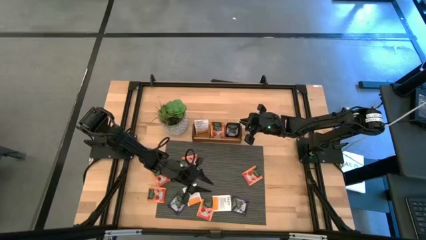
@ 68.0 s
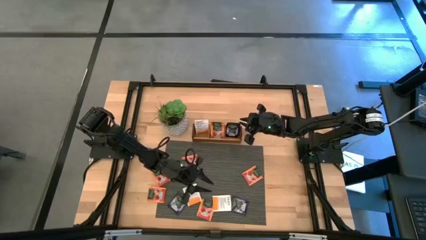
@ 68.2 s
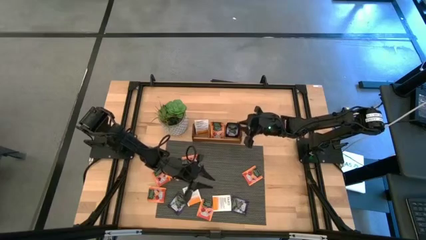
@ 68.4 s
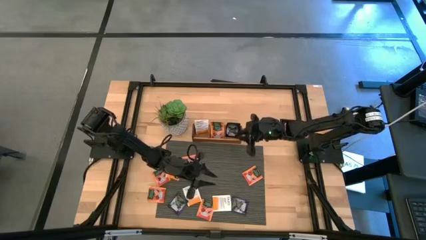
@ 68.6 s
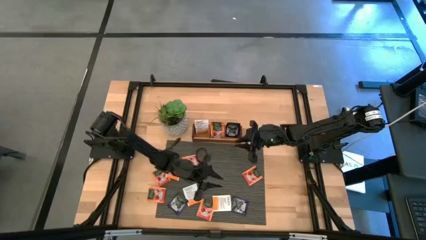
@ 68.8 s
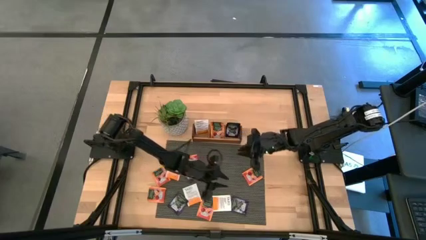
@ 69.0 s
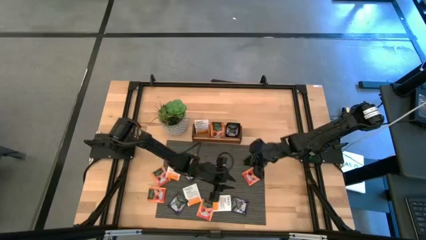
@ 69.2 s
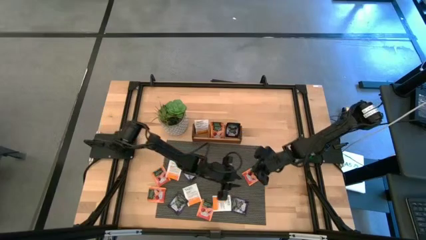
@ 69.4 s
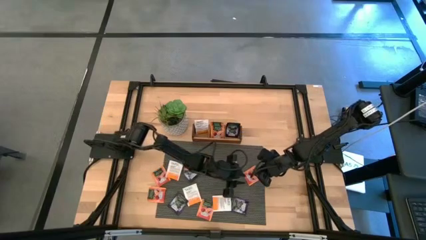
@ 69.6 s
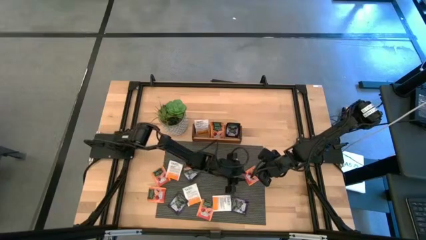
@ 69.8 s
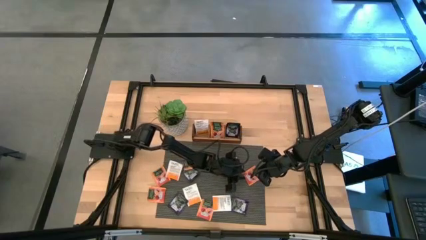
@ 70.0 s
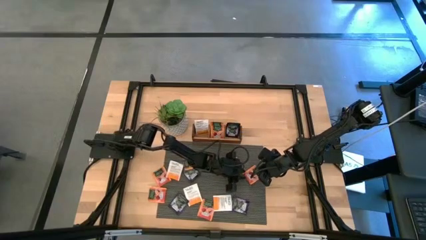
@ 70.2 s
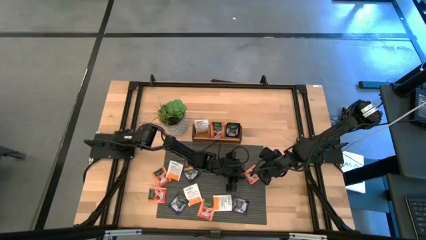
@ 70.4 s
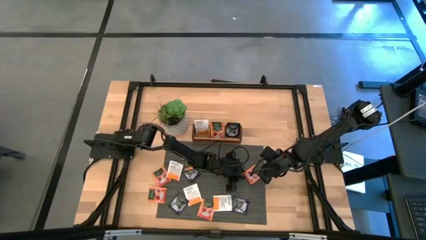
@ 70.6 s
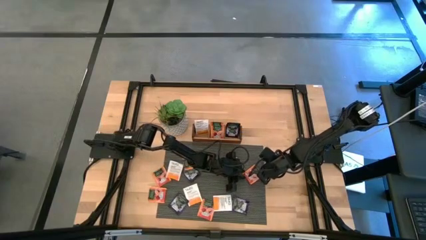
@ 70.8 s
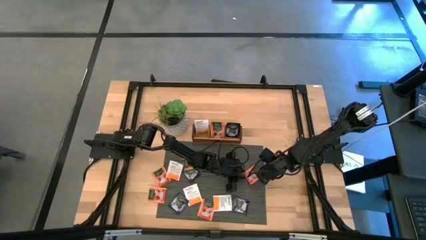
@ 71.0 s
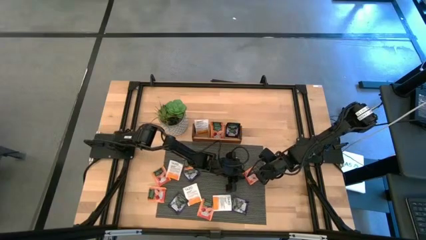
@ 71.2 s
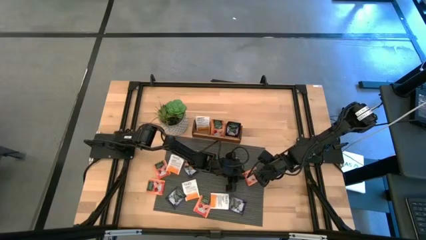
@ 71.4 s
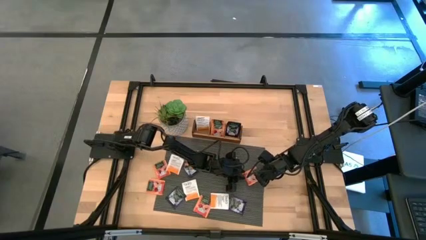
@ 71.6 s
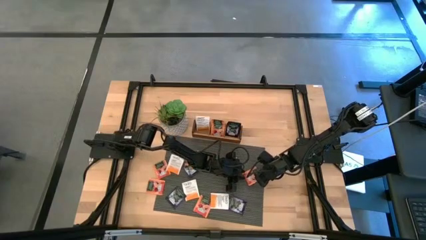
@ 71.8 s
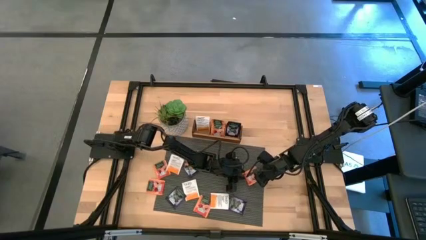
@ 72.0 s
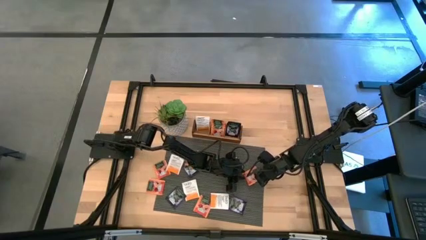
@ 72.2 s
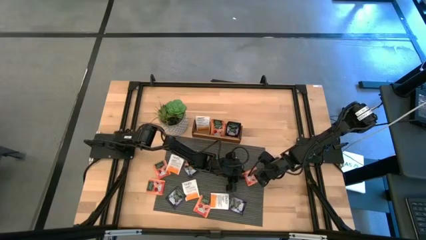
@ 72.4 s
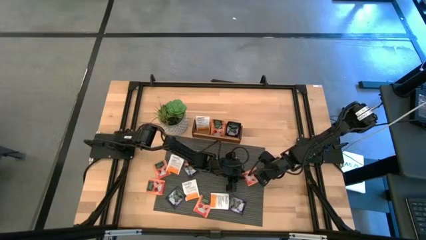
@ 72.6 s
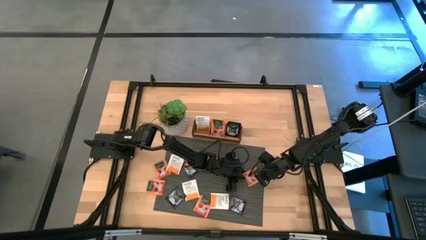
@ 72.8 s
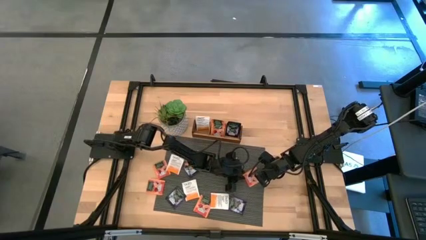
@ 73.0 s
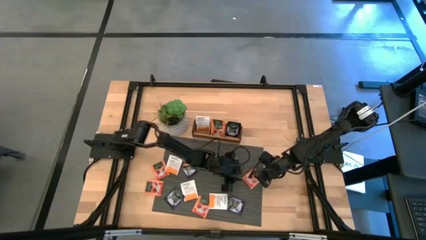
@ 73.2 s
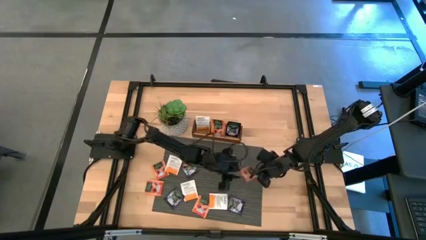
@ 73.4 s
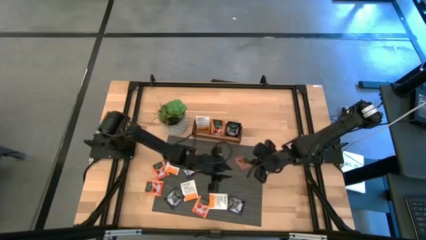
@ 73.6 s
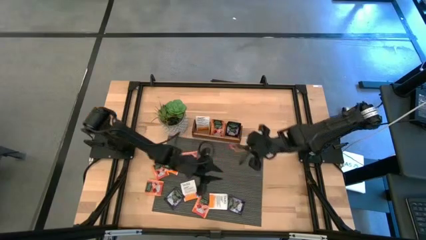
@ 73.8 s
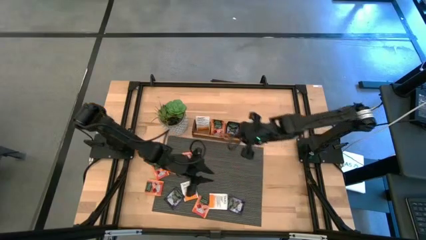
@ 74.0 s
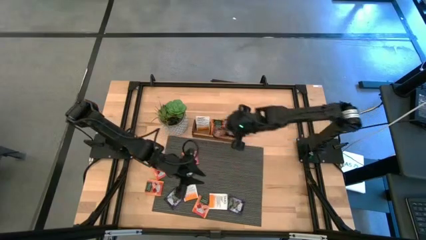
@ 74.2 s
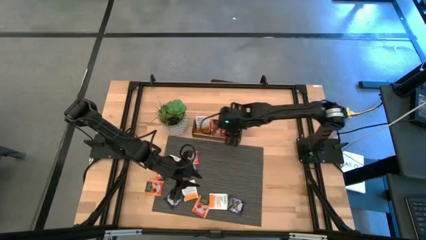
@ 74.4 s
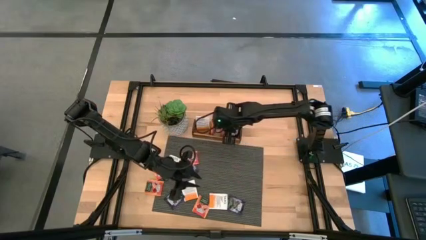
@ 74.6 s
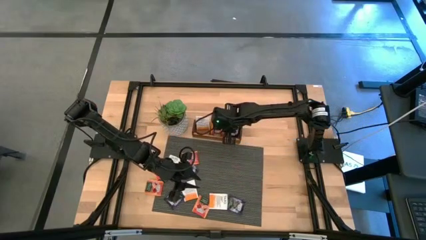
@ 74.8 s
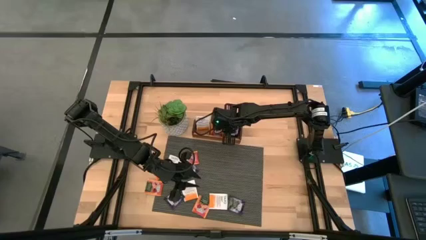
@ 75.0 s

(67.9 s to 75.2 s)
Task: Pick & Place Tea
Put the orange tea bag into the middle section of the wooden organizer

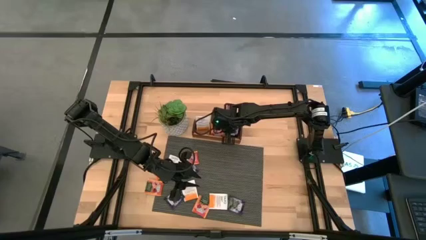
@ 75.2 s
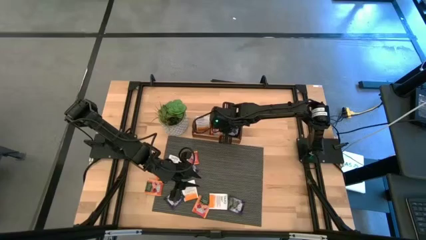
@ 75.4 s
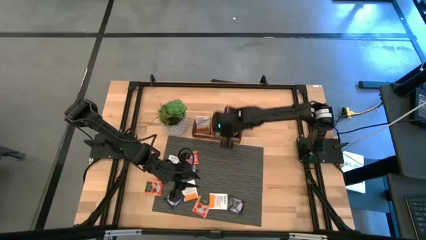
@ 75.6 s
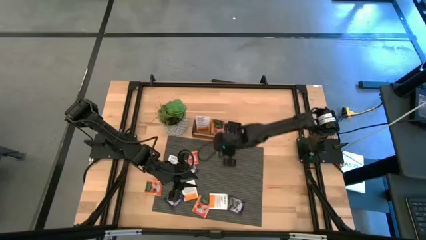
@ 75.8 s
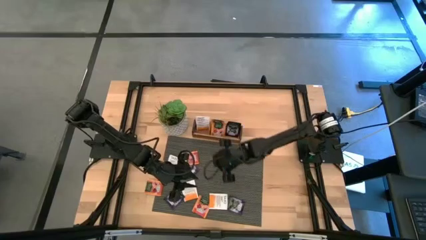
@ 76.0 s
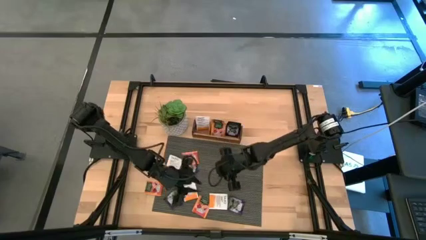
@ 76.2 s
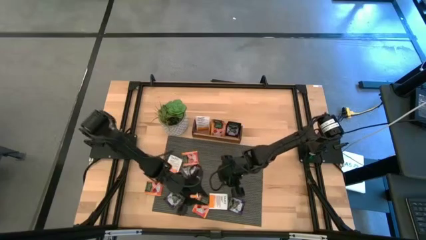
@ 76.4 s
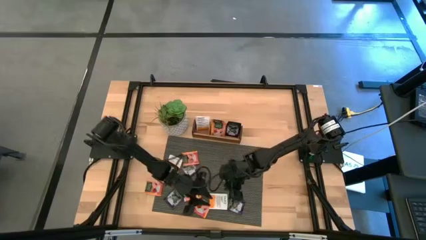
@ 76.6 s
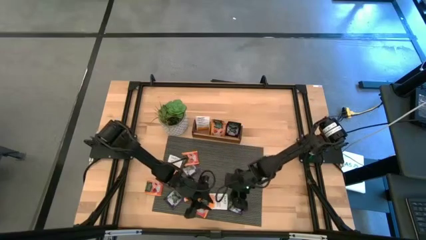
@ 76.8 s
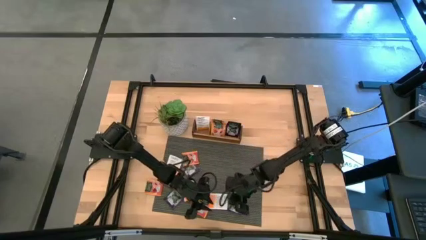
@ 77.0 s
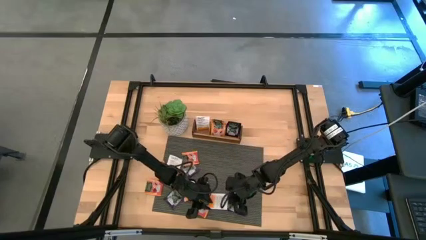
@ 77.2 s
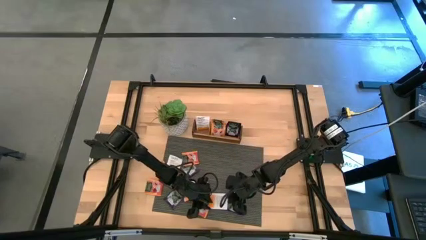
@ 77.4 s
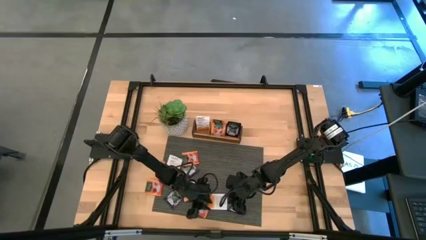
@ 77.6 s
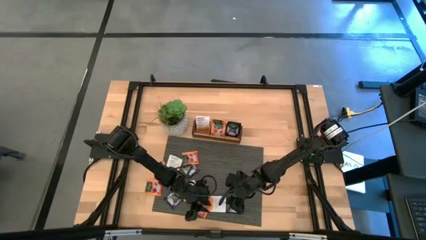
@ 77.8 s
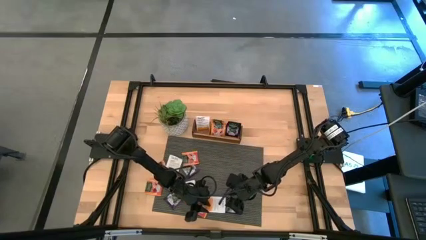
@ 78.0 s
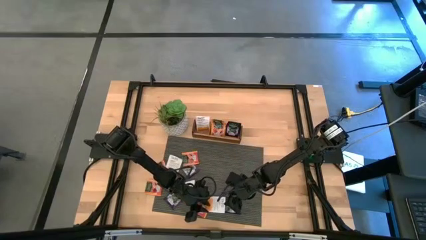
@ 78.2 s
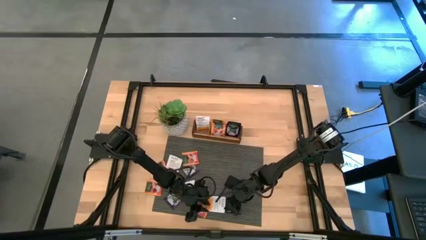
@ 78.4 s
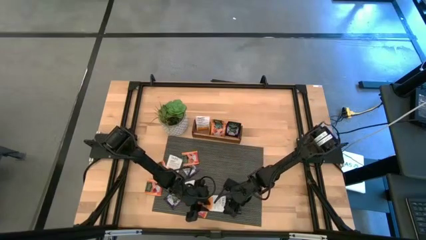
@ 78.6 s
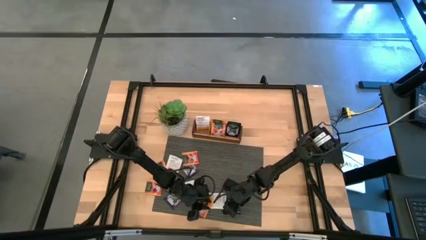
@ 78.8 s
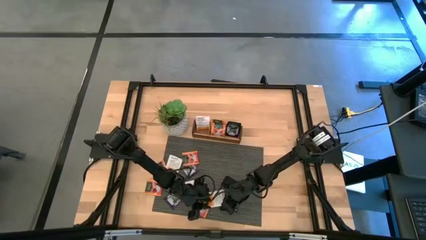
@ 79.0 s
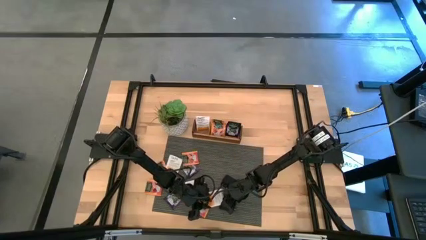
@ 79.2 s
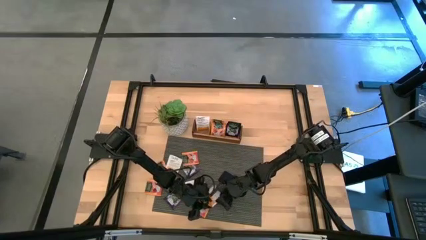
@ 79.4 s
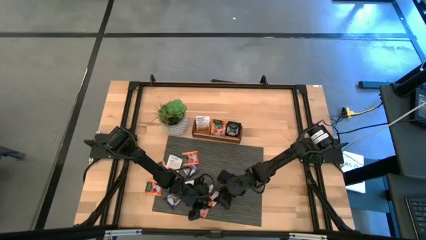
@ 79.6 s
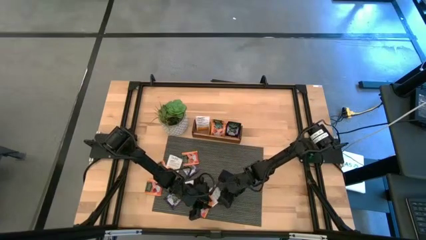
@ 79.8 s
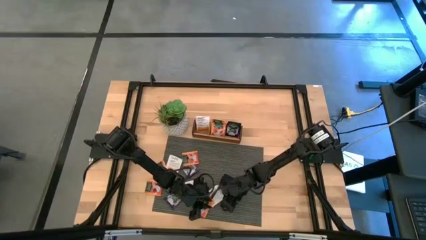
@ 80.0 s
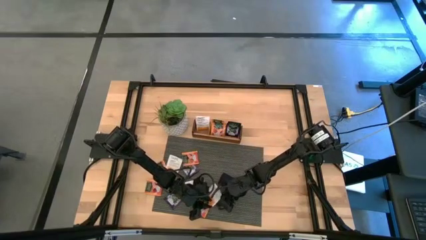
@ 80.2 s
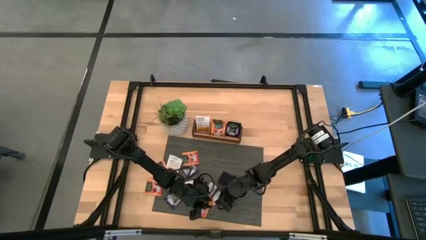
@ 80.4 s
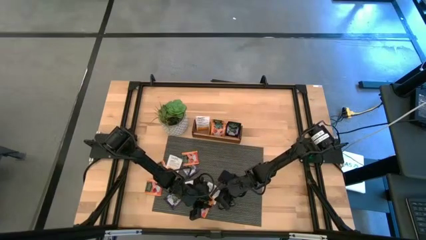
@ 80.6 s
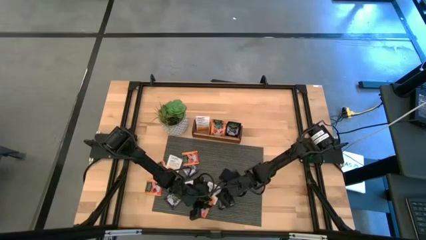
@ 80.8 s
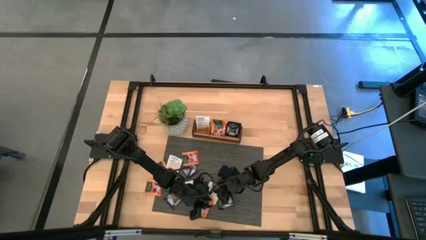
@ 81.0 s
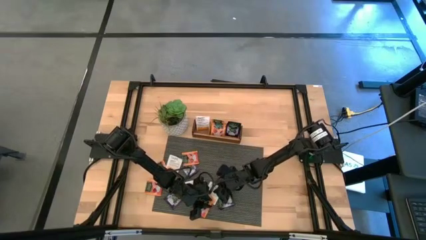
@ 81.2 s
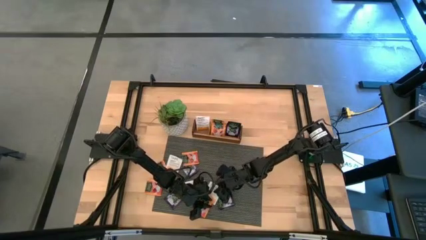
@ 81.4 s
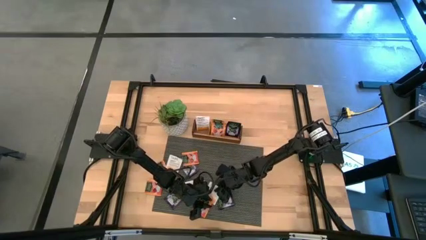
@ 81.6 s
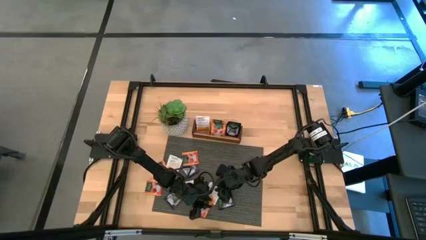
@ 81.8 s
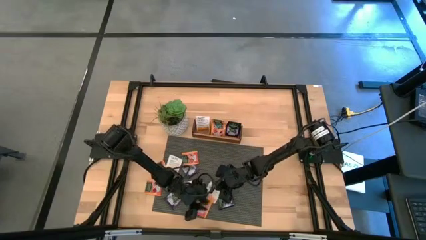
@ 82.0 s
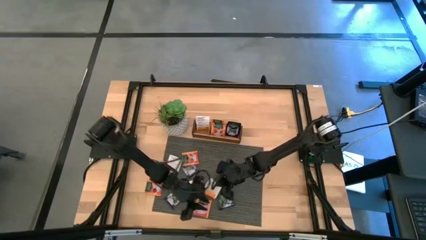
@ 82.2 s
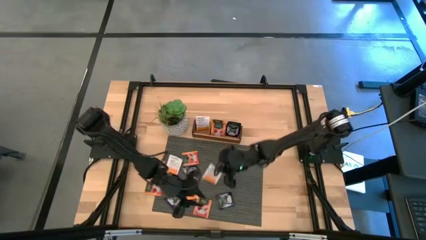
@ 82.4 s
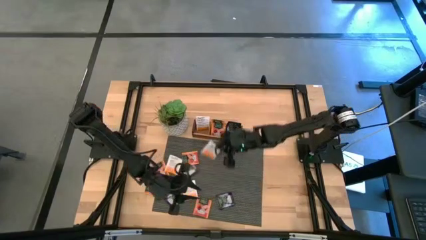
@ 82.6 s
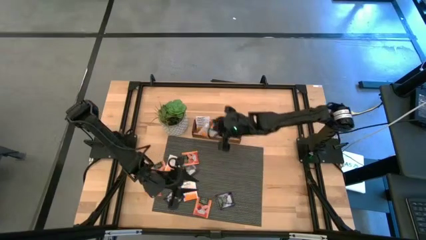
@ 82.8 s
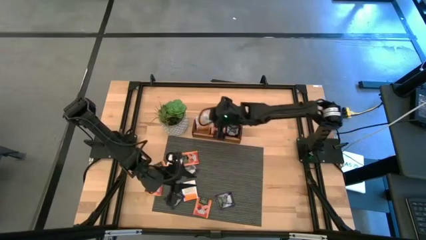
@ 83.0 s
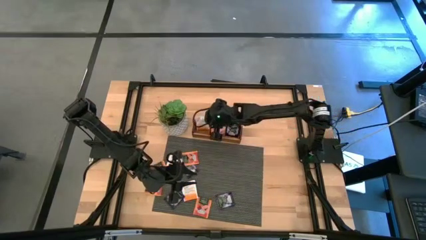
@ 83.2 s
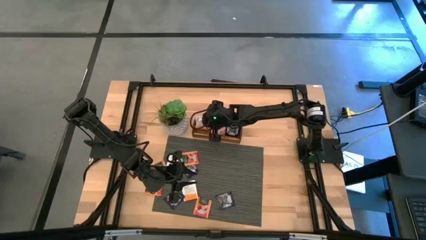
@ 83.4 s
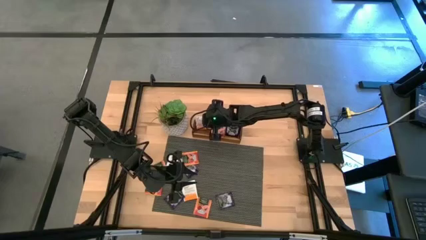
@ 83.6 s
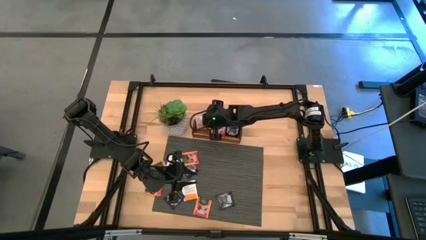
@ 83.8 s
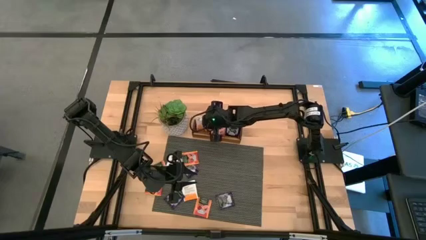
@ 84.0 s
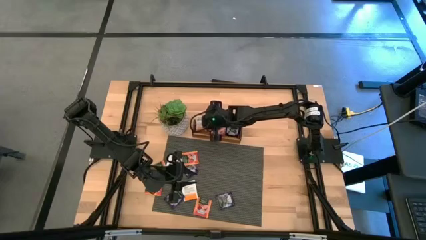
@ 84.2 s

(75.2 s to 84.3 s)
Put the white tea bag into the left section of the wooden organizer

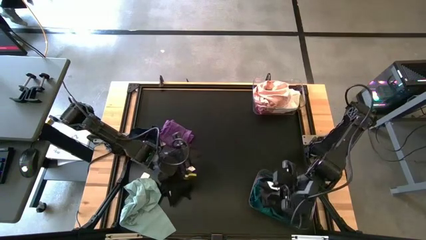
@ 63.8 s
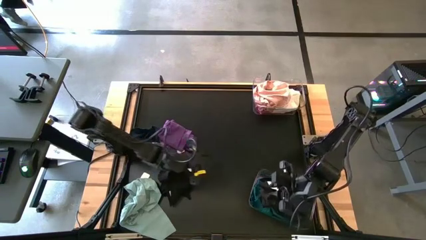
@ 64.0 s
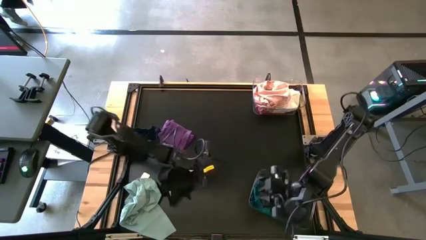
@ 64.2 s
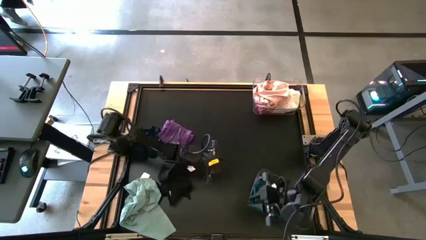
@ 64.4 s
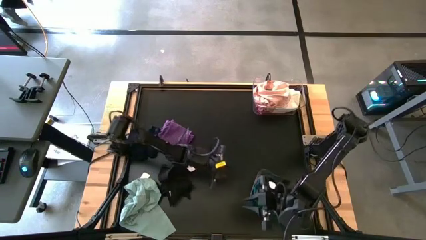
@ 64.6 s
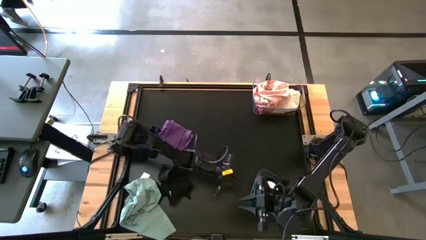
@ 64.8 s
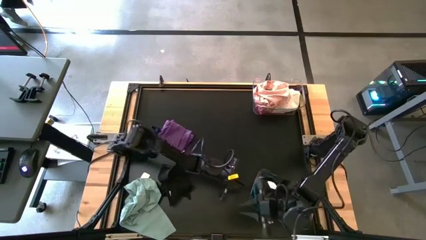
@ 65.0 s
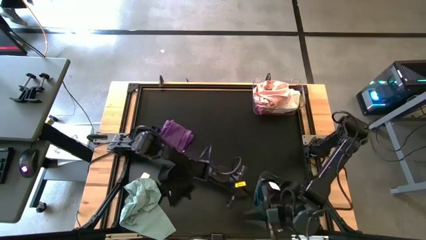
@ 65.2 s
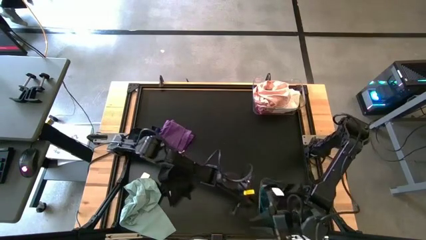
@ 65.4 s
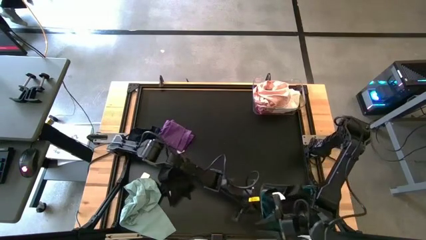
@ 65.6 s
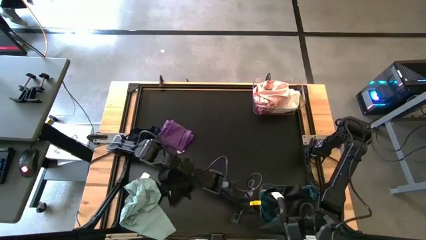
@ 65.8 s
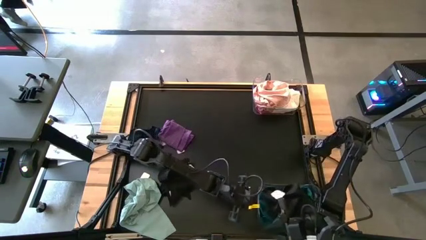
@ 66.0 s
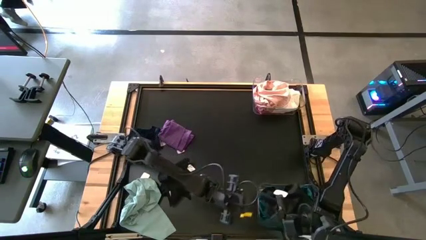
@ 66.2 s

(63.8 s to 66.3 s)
Task: Sort towels by color in basket
Adjust the bottom transparent bin
